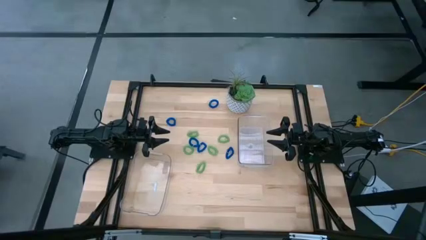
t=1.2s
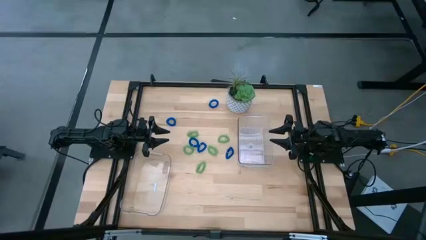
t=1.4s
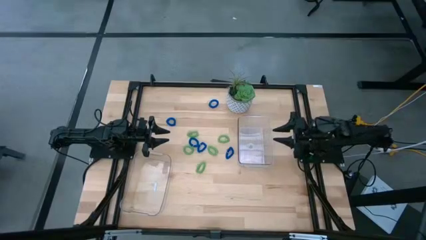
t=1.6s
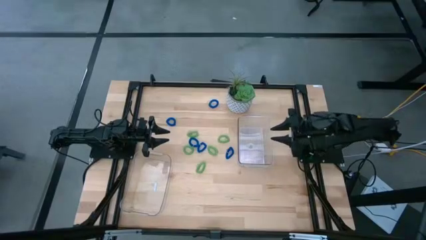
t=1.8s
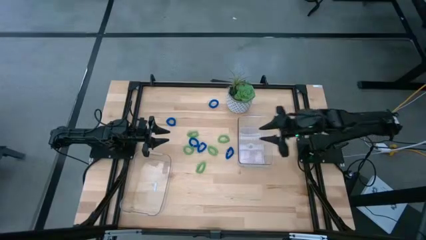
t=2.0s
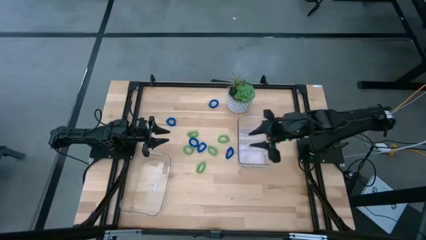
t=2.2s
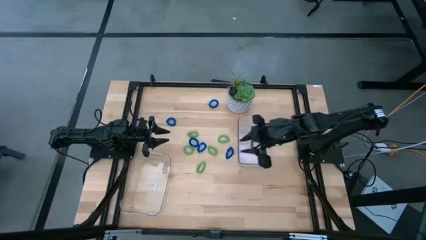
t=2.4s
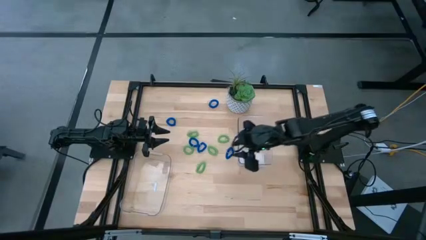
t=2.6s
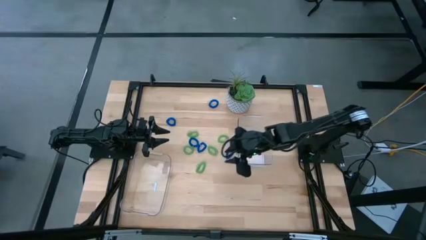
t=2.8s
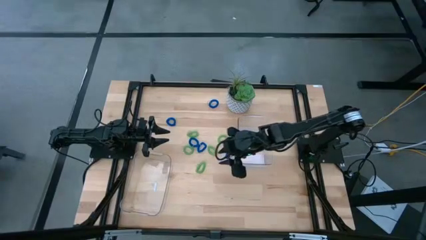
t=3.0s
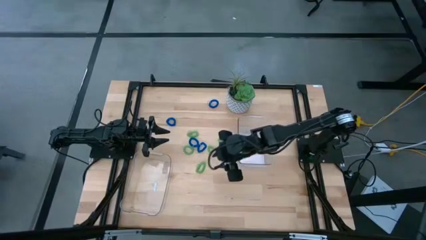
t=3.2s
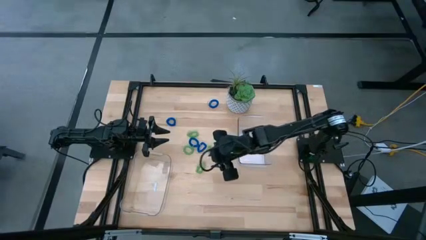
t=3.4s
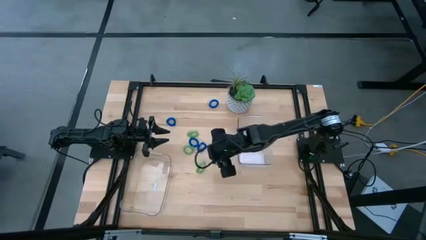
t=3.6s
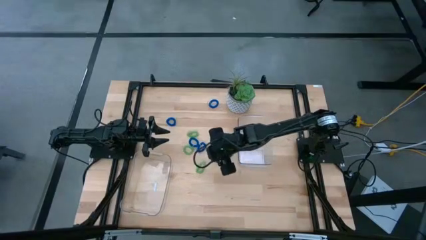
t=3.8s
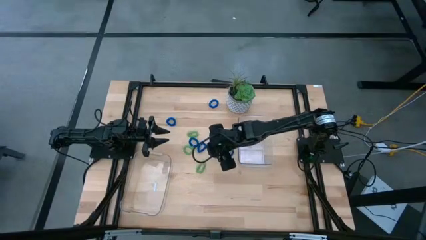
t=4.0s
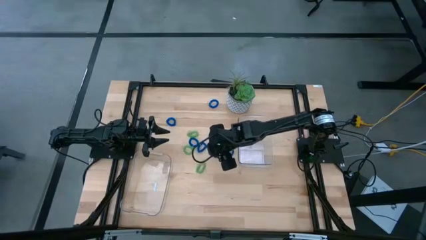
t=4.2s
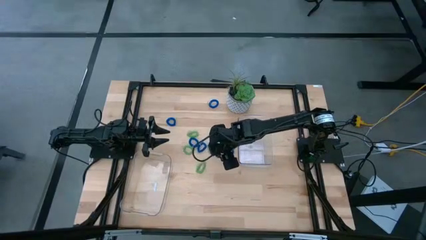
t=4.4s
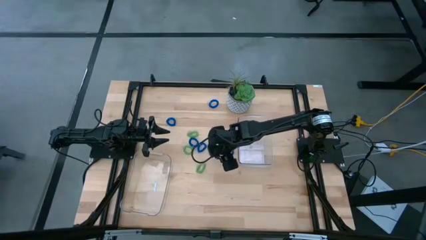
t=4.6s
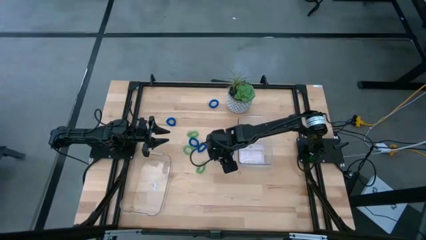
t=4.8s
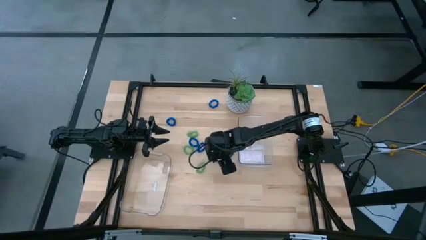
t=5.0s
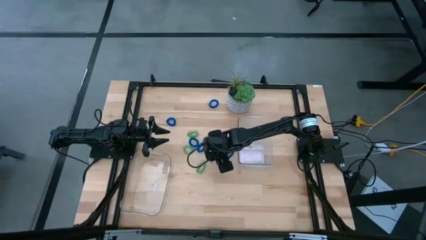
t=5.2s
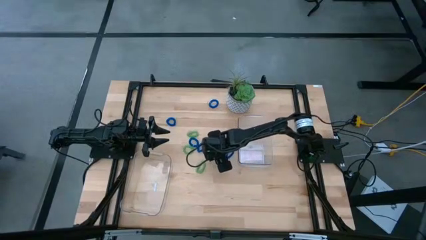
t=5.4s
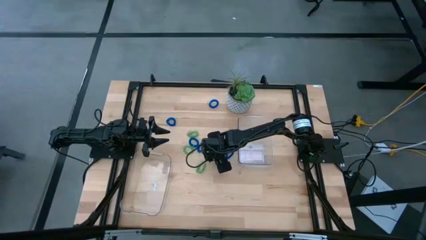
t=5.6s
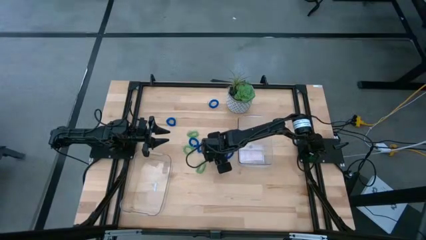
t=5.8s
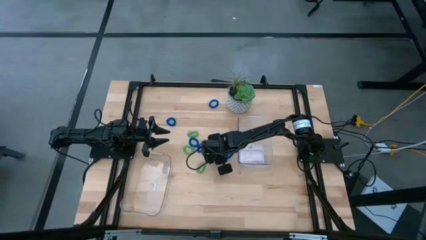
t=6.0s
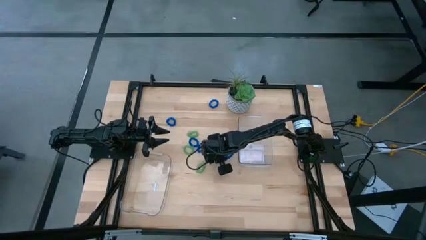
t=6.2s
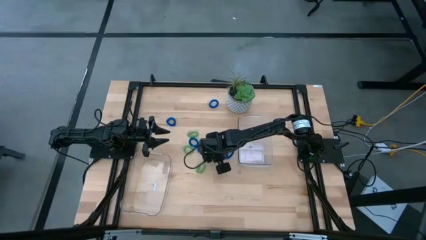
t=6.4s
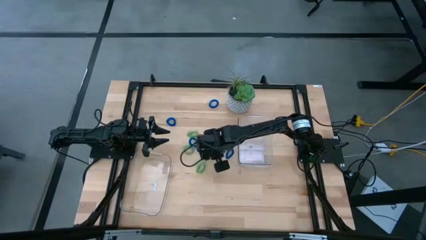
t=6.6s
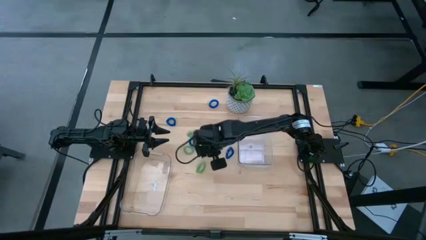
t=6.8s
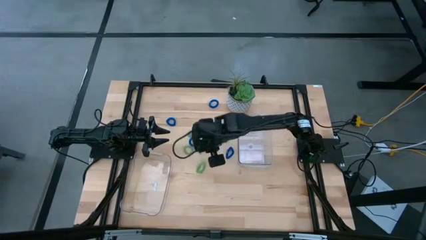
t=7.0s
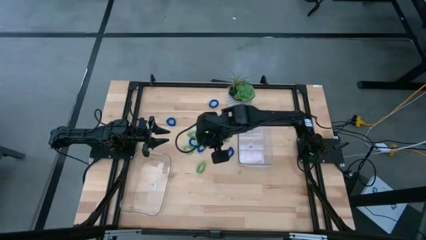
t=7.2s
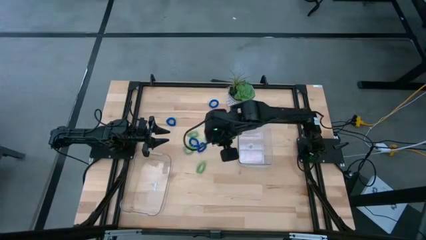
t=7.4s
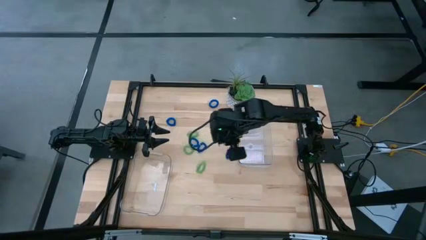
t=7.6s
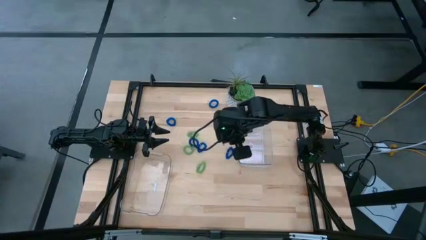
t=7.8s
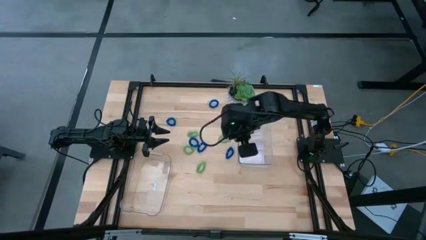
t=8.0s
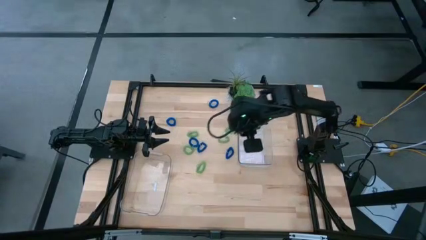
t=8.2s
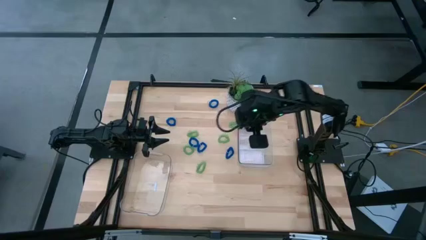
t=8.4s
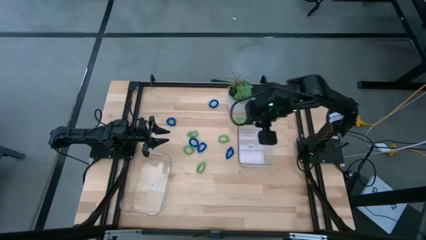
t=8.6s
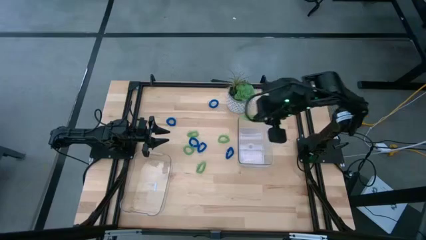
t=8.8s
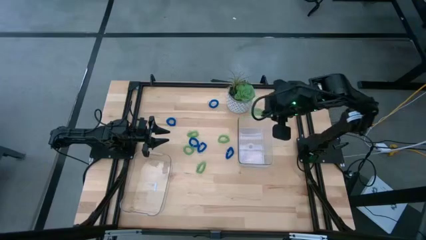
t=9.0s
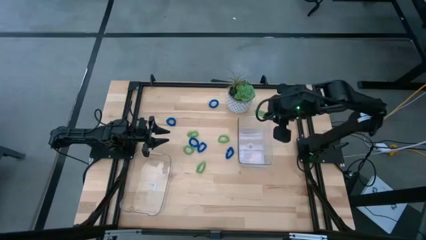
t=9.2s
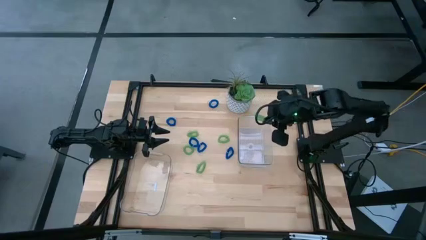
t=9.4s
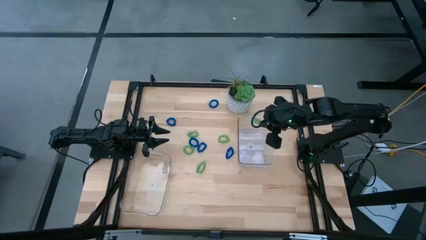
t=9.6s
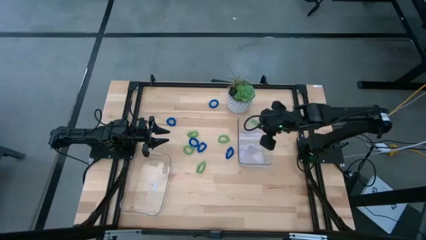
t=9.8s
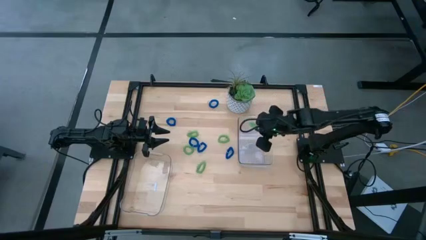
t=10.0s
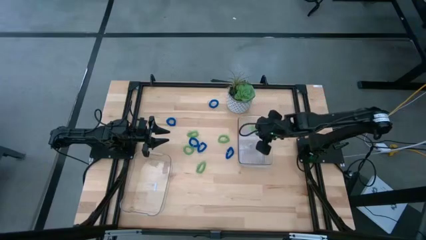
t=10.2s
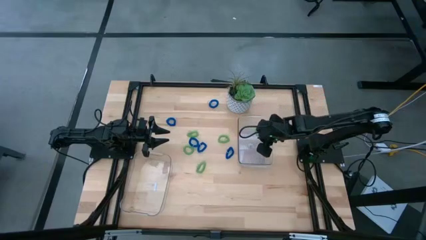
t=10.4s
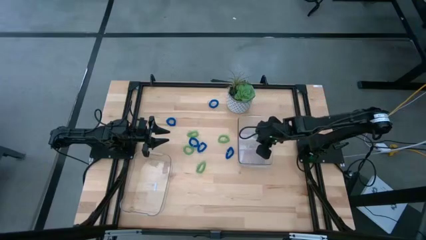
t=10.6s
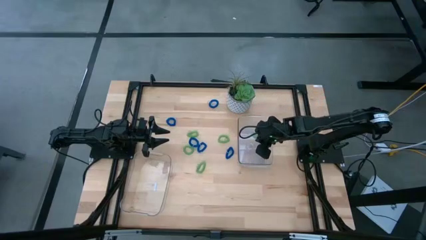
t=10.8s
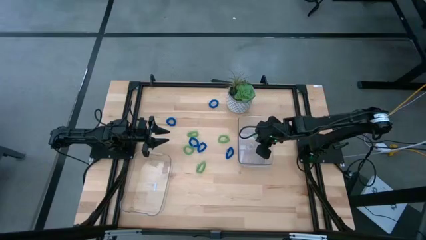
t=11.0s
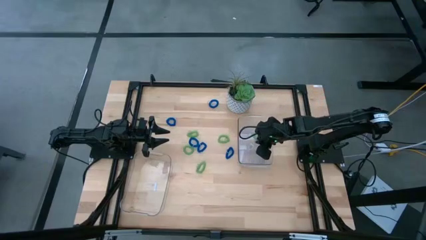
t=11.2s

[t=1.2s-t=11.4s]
Task: Sort spring keychains
Put the green spring keychain into the top transparent bin
